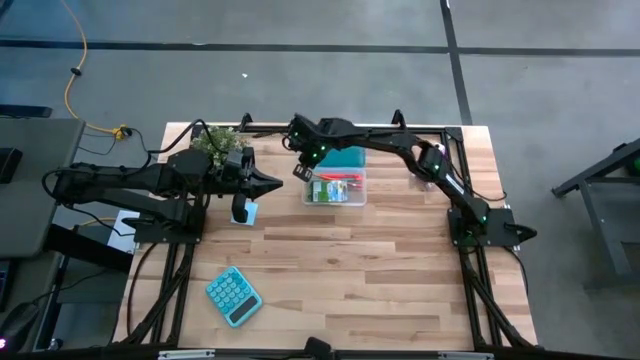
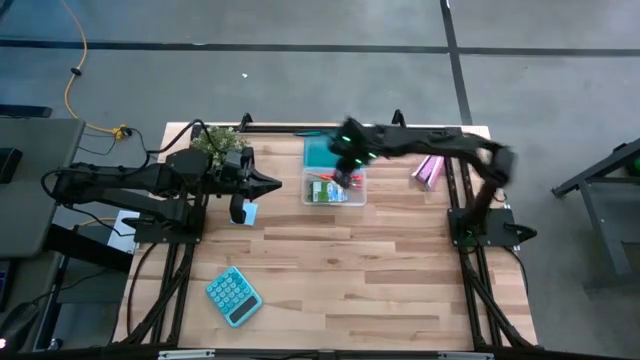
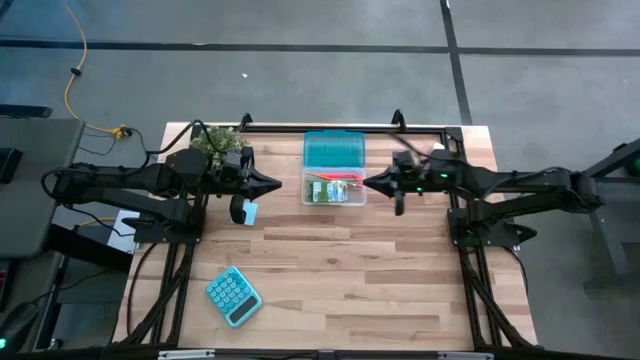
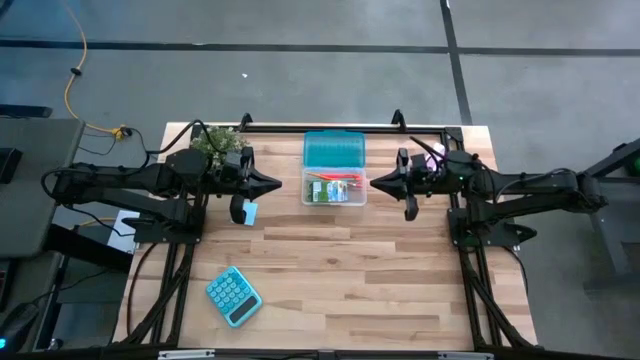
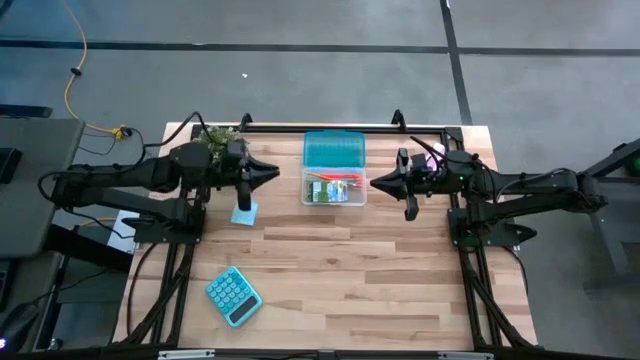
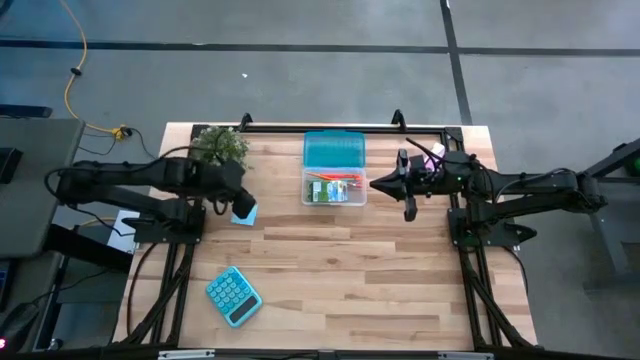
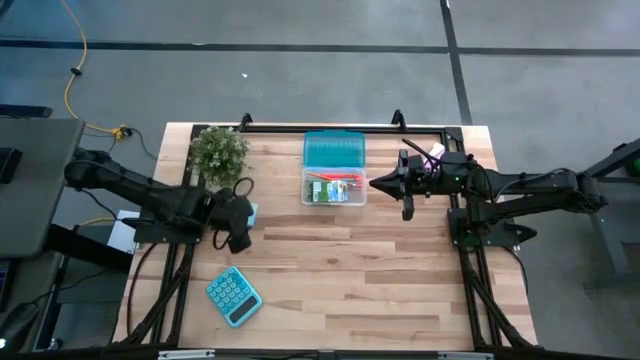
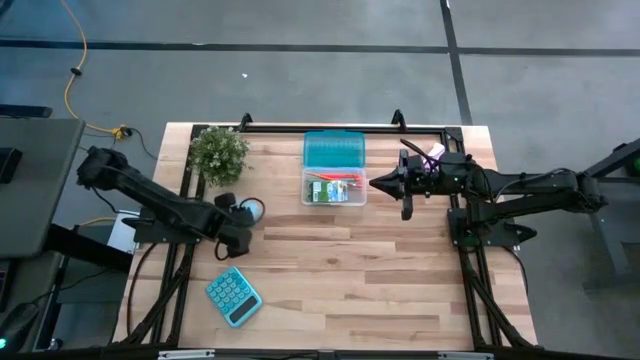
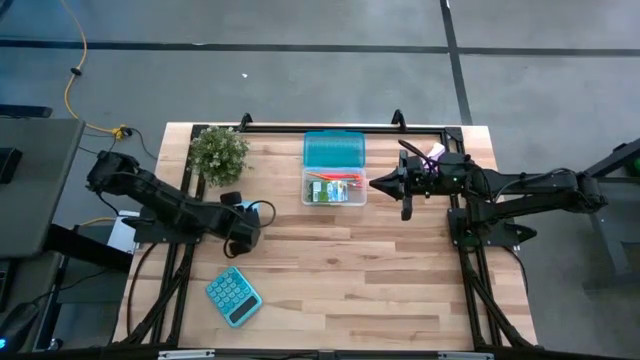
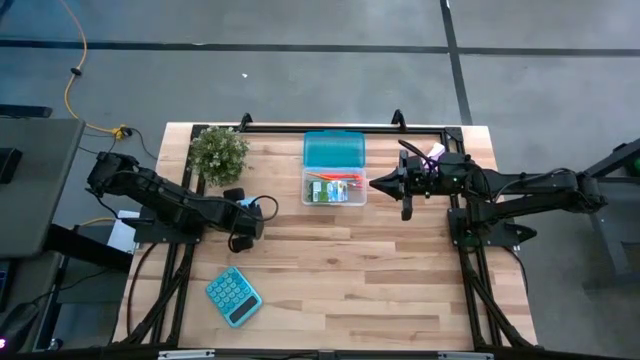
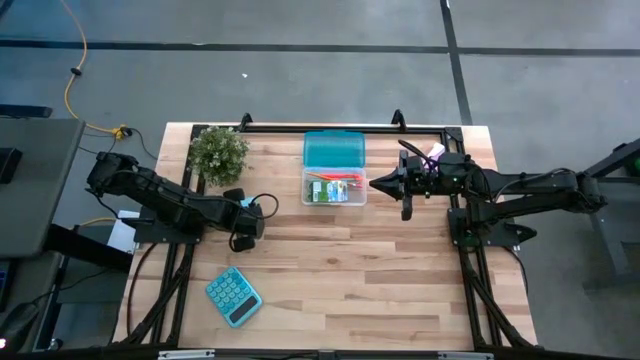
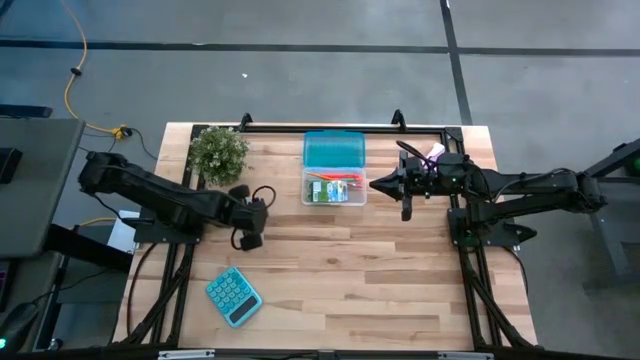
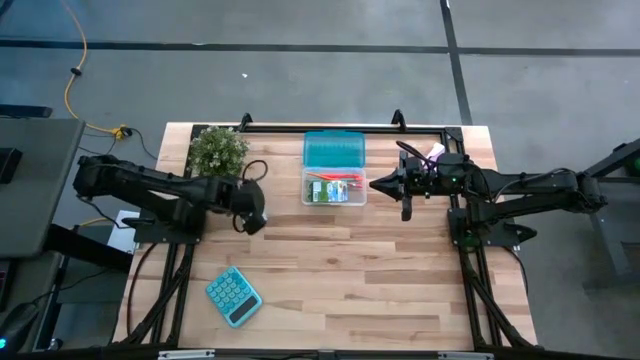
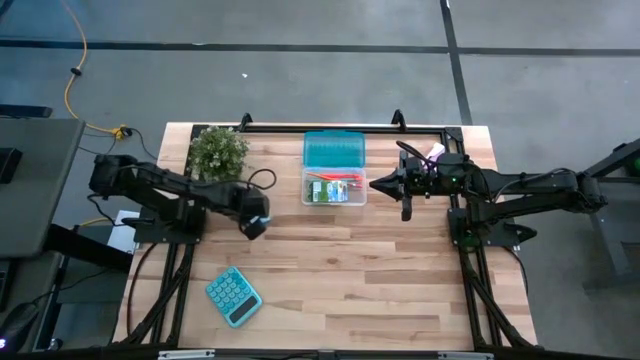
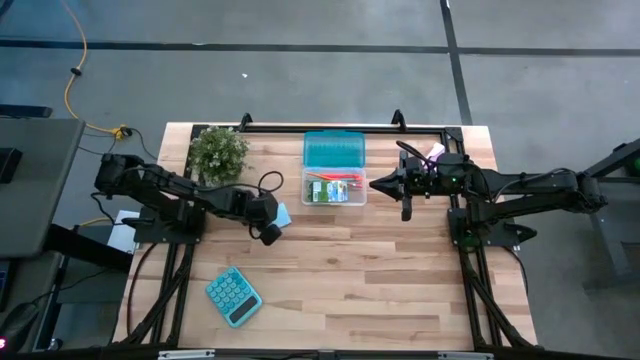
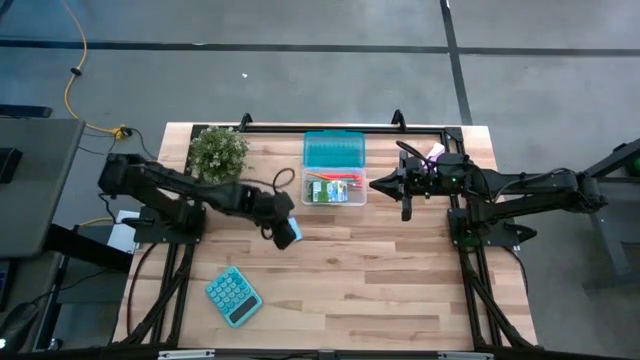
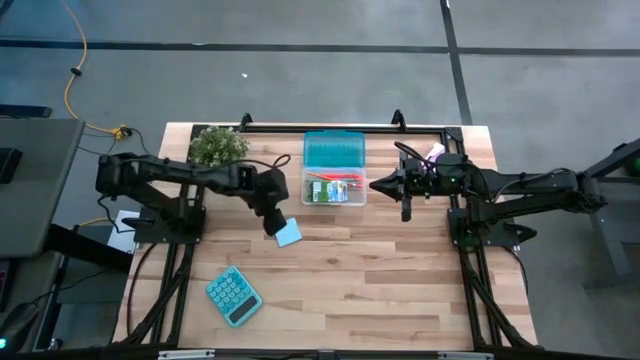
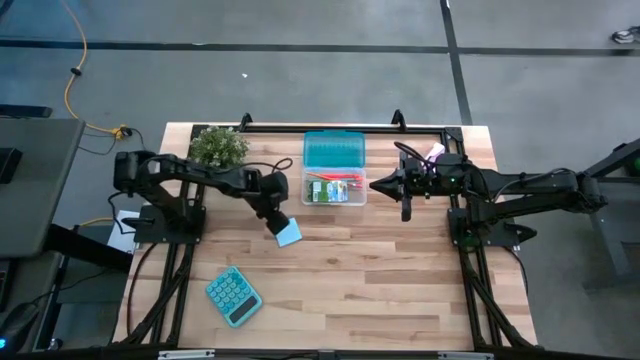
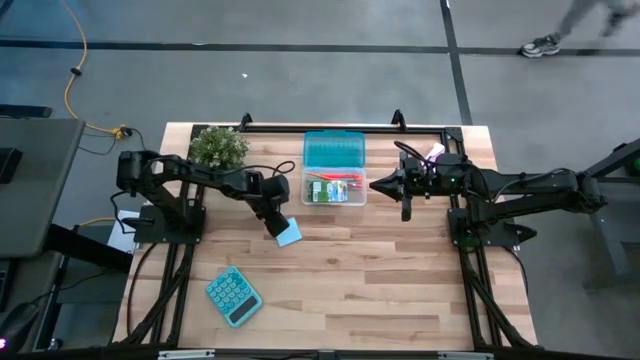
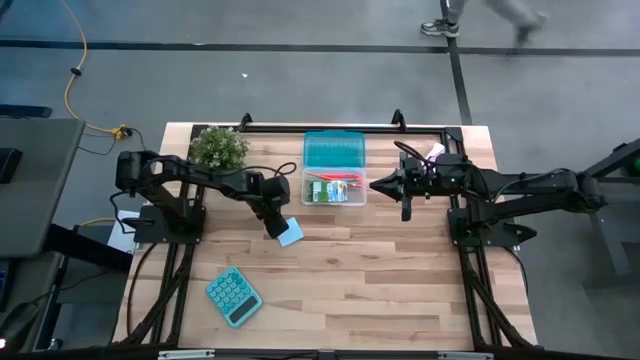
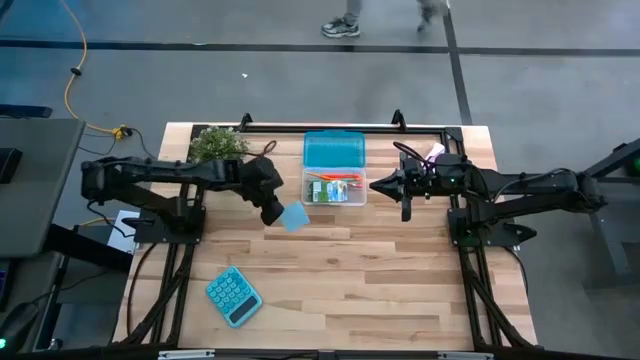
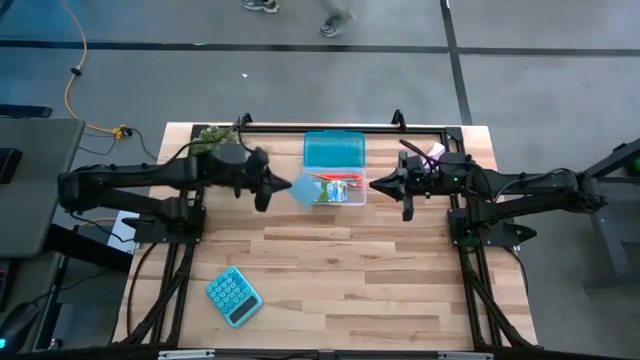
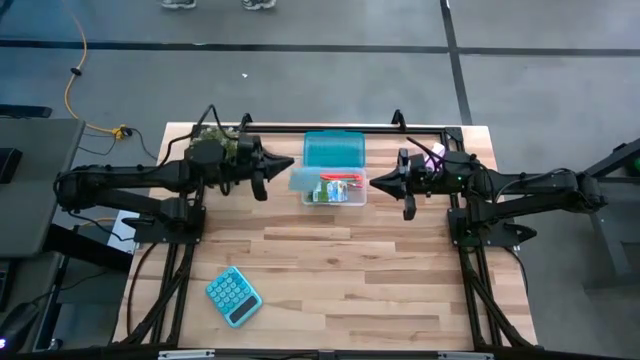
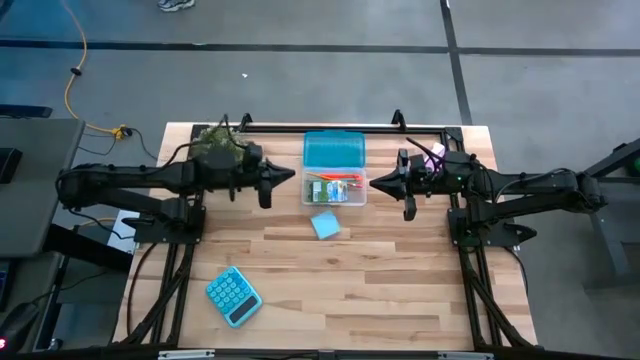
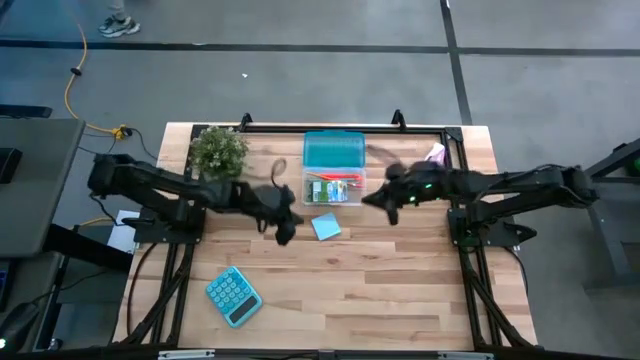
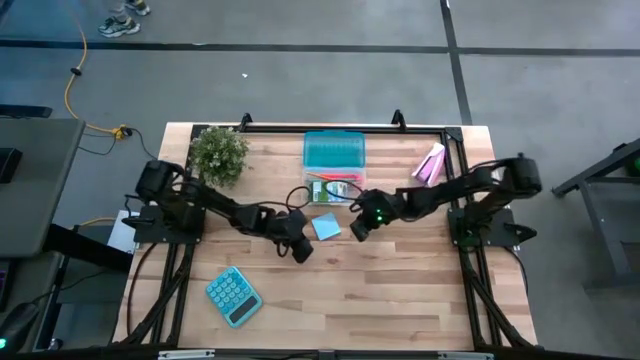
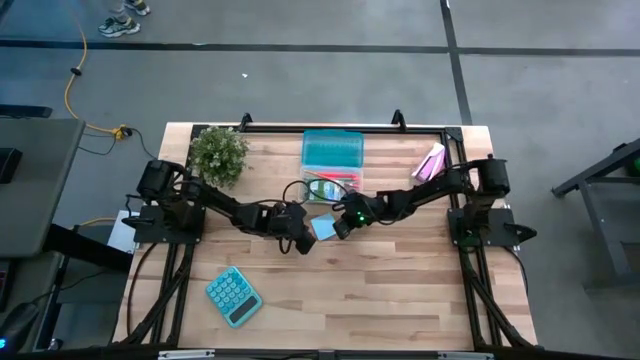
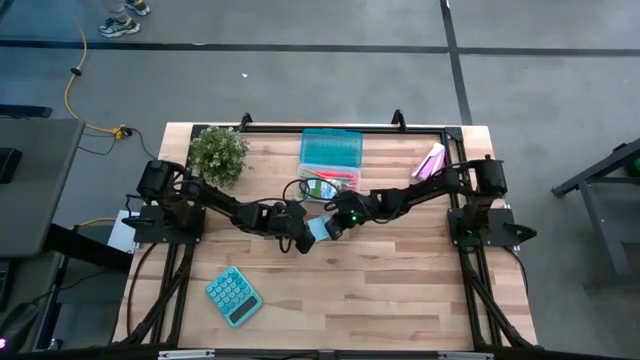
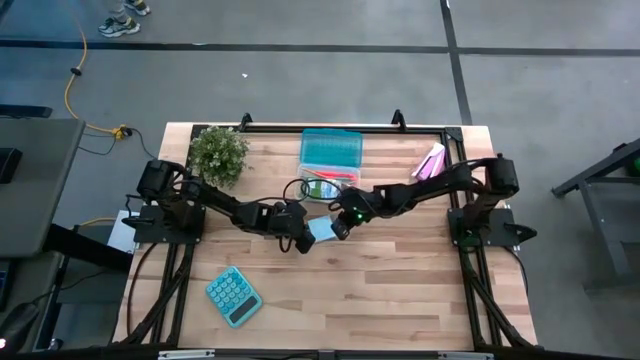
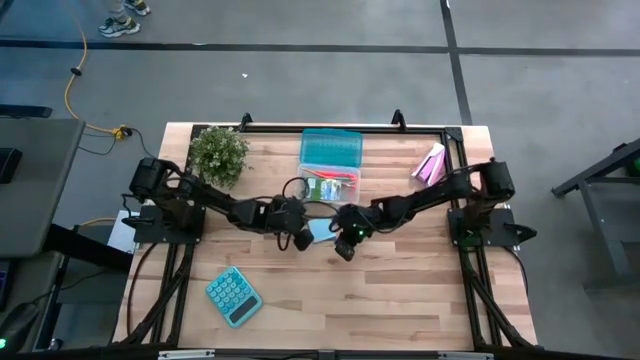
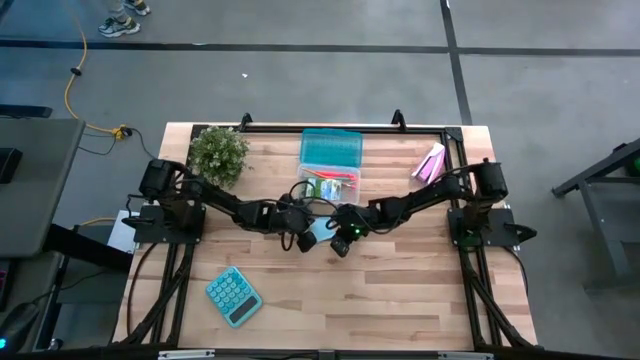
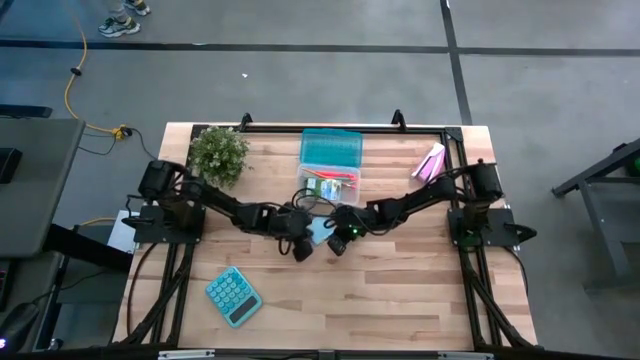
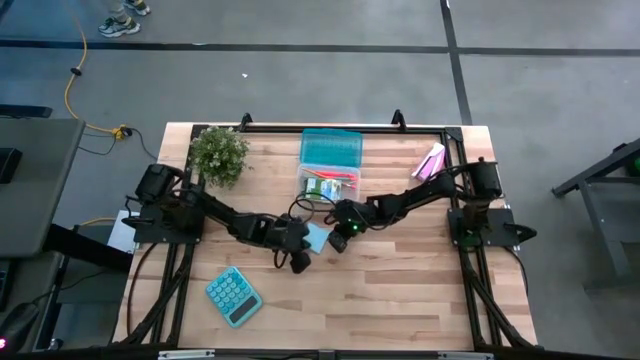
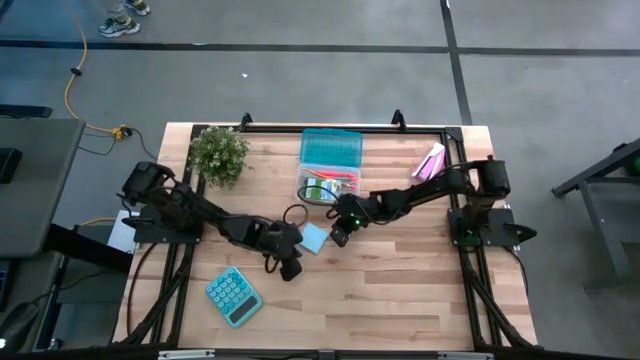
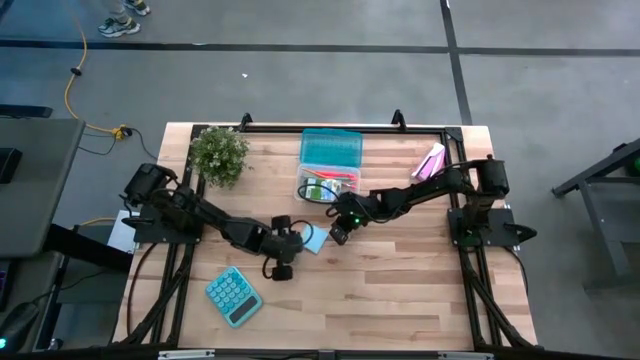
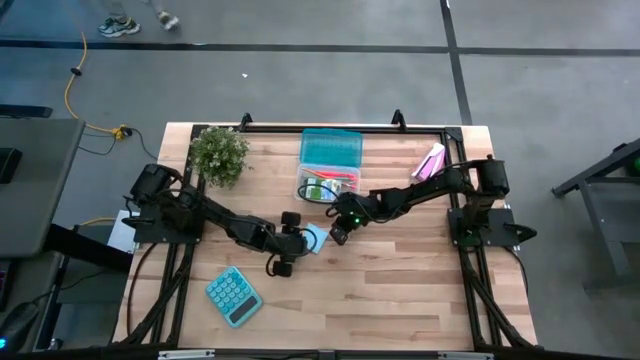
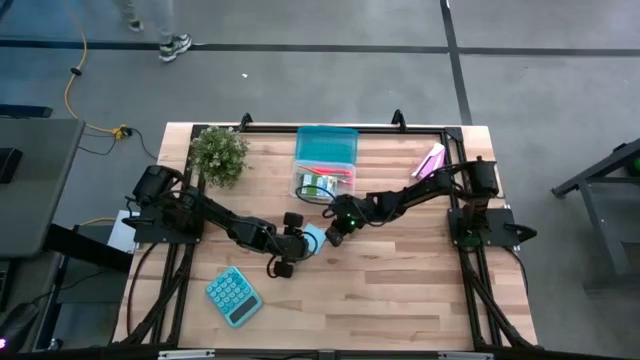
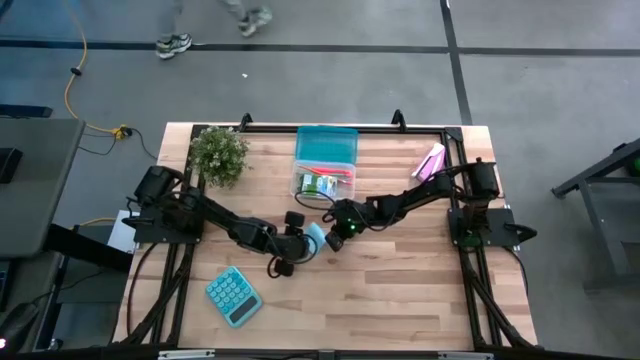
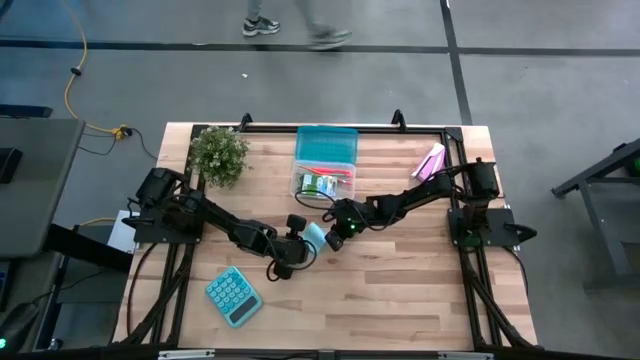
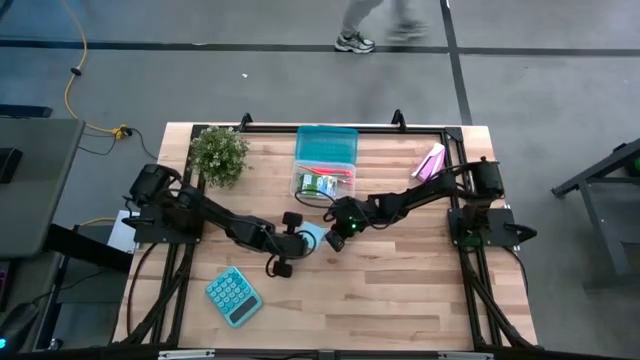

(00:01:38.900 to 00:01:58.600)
Task: Pack school essentials
Put the blue sticky note in the supply box

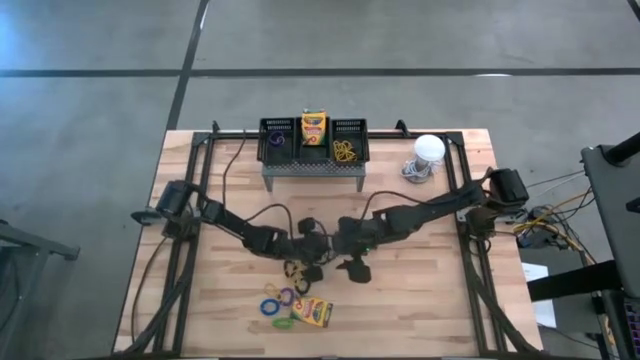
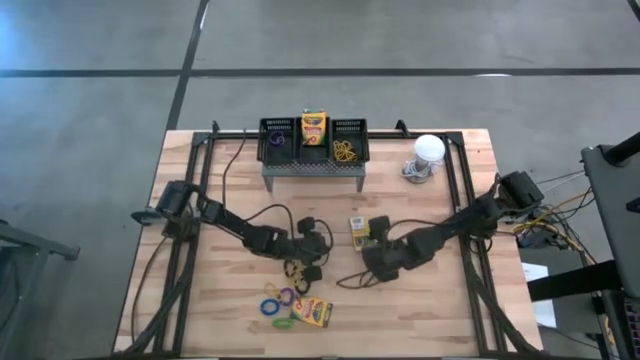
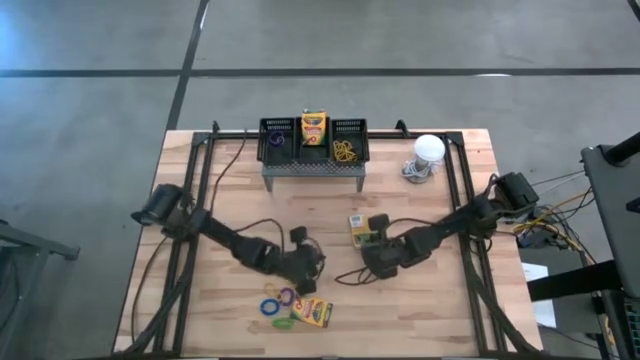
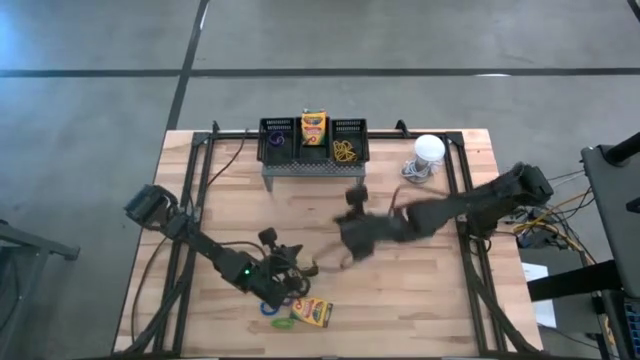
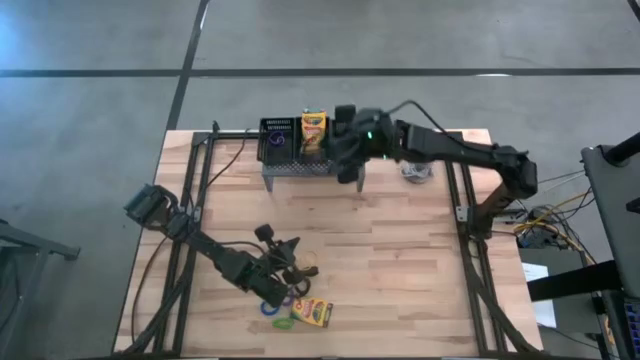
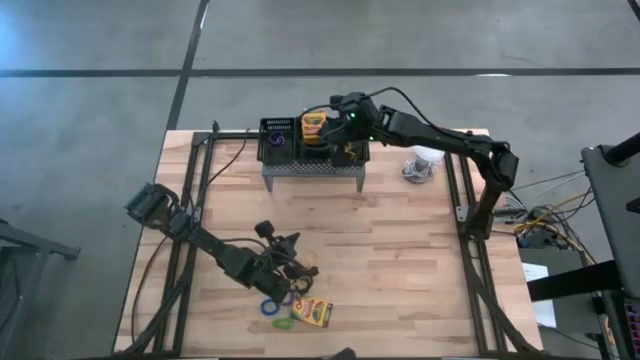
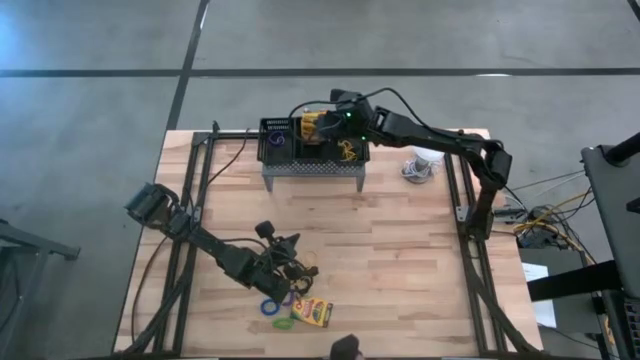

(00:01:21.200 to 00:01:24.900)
Task: Pick & Place Office Desk Supplies
Put the yellow crayon box into the middle black basket on the shelf
